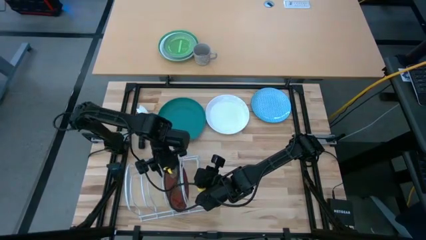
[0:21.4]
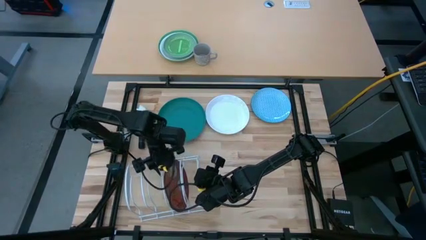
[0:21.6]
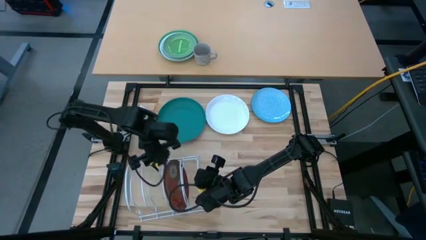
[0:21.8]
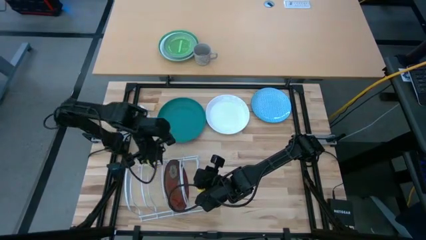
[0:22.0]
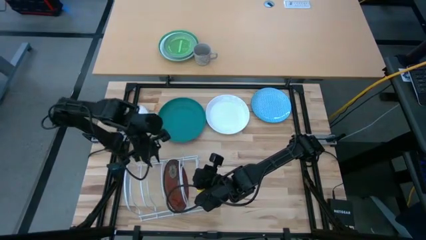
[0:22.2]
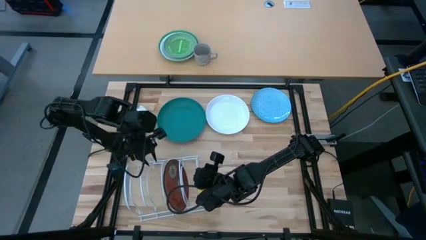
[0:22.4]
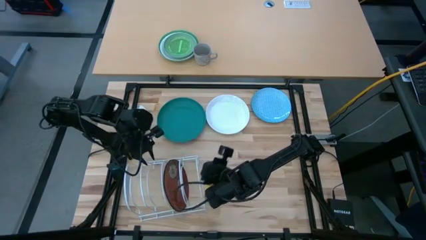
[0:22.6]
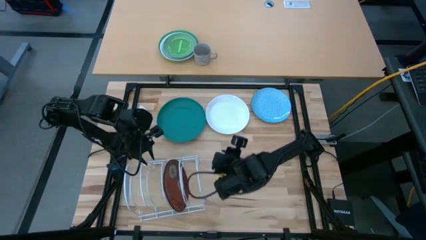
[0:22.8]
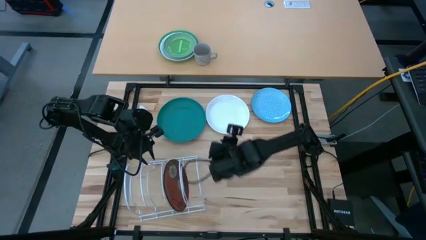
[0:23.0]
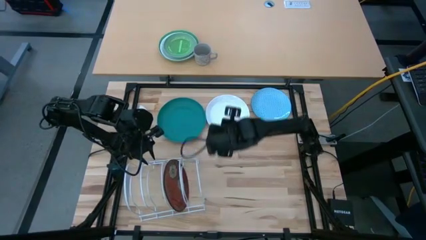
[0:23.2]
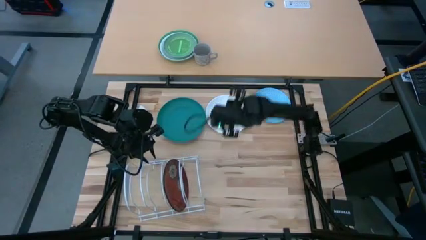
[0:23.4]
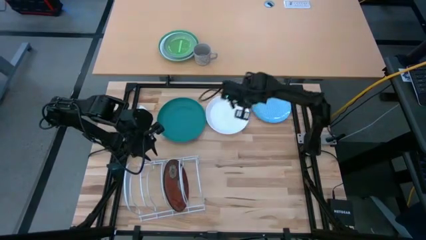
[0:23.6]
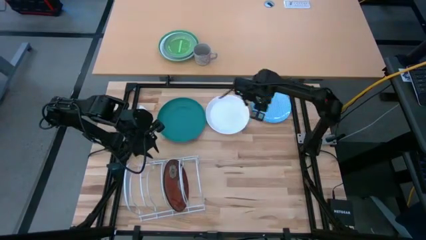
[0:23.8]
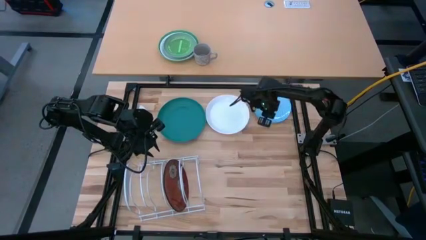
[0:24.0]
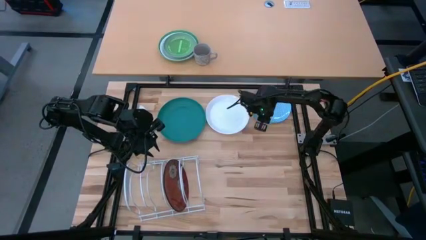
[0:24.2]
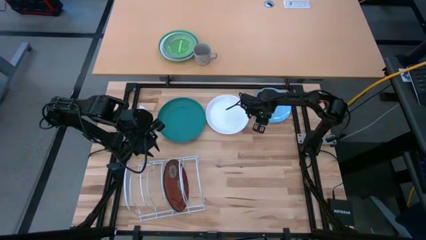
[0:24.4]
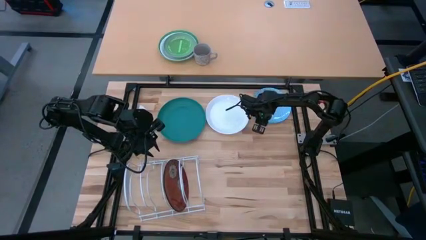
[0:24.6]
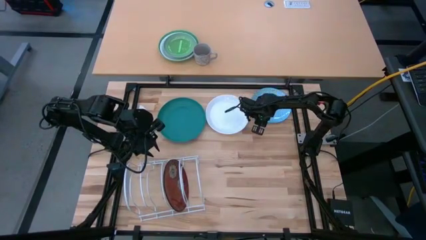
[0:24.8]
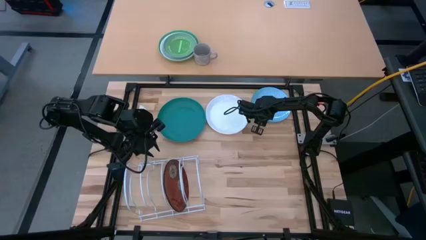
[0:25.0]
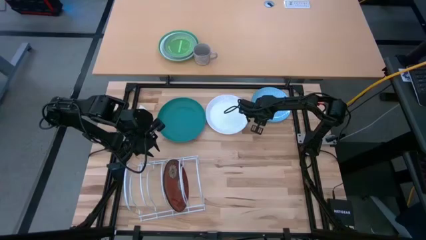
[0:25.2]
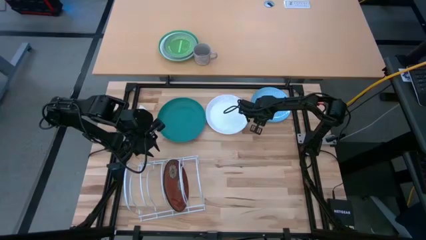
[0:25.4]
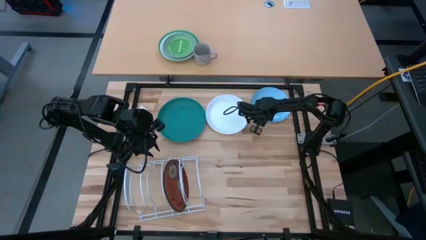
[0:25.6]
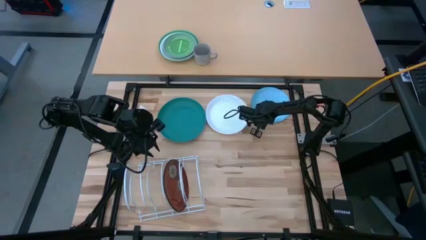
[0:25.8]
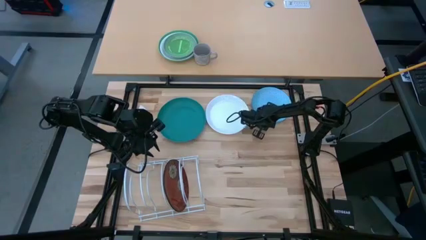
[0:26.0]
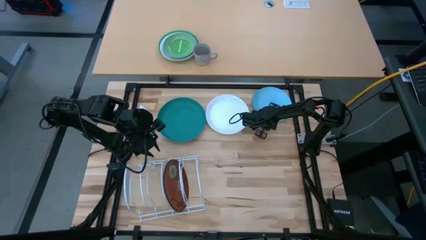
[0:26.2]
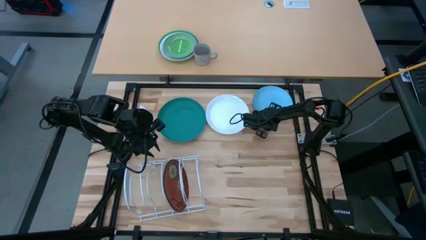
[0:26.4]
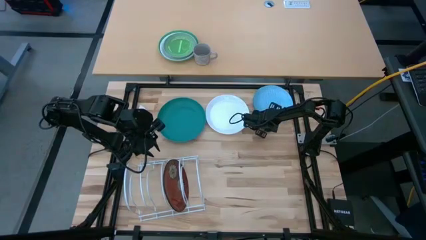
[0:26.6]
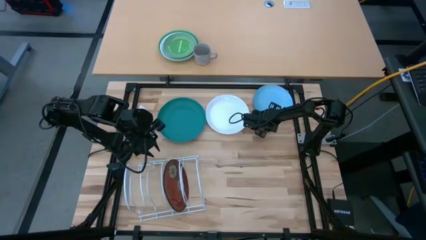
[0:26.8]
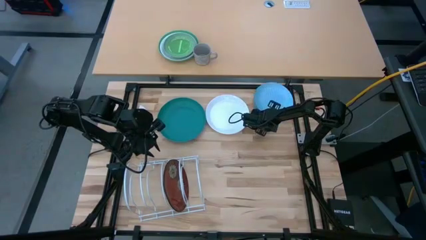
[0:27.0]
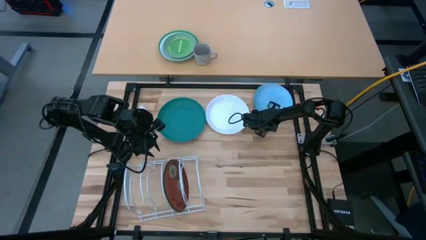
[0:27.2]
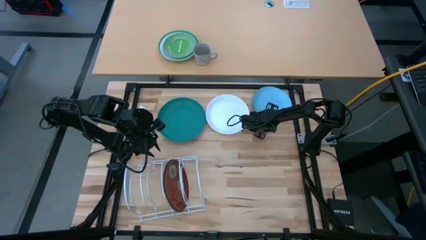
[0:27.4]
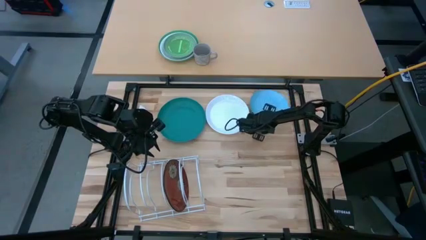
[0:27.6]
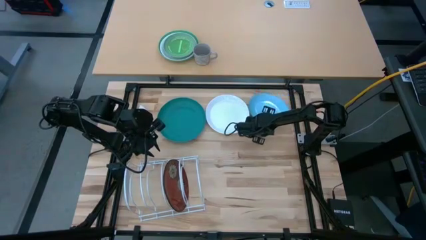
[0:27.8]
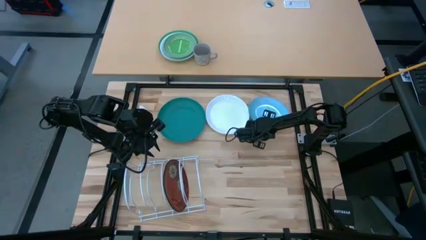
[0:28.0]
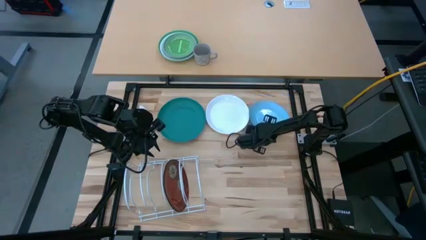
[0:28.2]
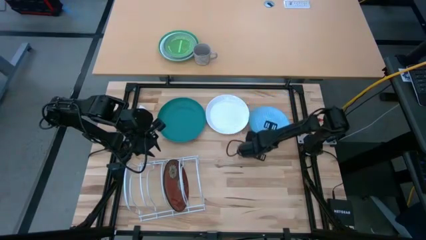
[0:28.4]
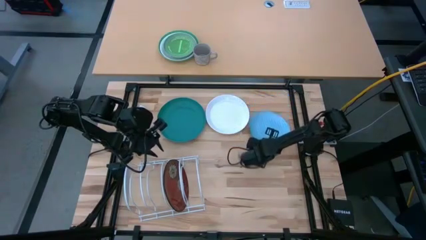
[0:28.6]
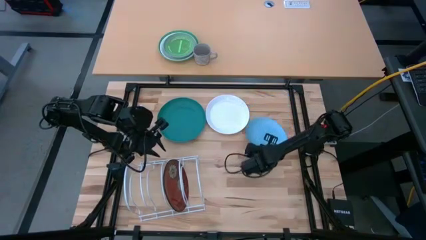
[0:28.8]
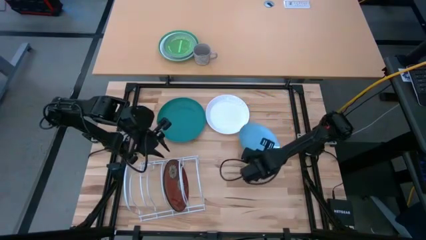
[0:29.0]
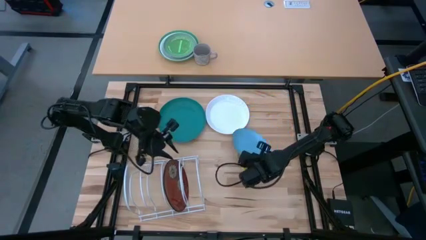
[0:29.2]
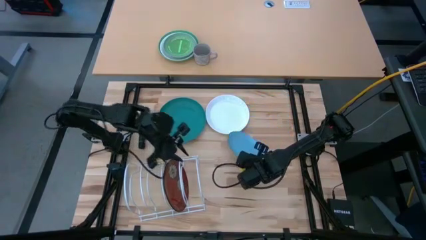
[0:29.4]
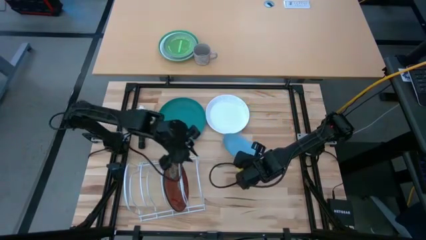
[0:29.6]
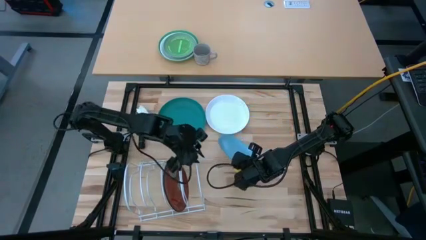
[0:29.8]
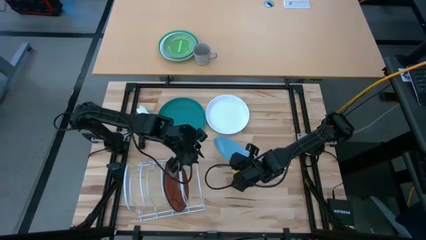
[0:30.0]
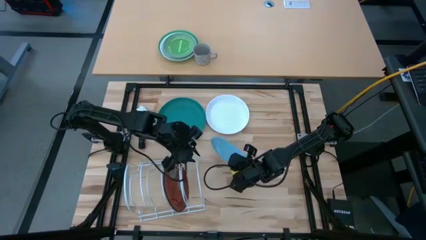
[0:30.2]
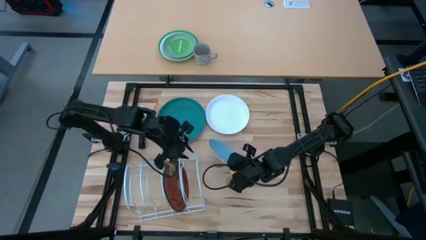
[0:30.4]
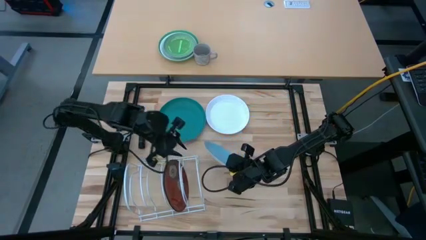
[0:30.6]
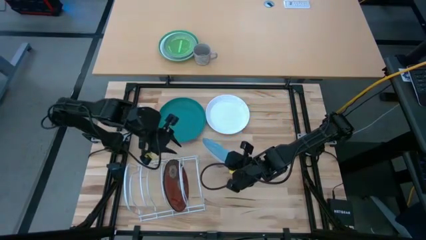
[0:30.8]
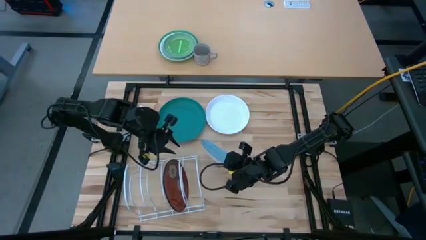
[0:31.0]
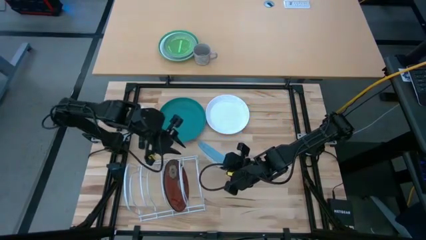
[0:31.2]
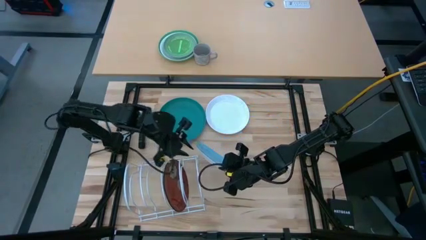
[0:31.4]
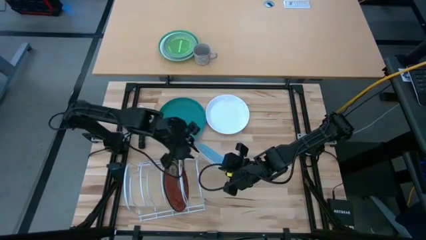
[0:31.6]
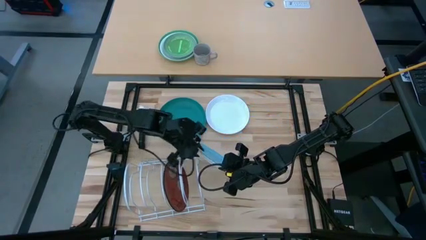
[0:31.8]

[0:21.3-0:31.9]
Task: Sort dishes
Put the light blue plate into the dish rack

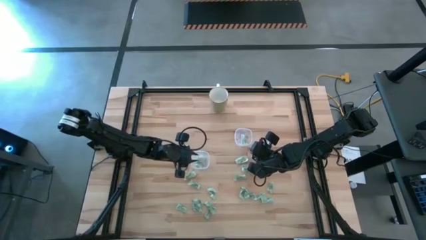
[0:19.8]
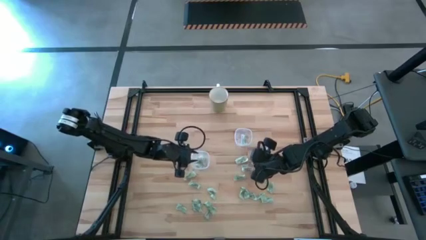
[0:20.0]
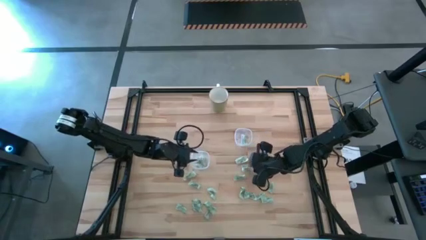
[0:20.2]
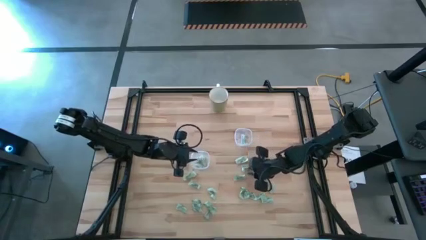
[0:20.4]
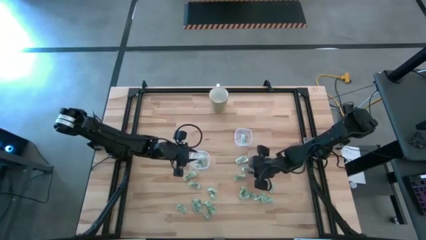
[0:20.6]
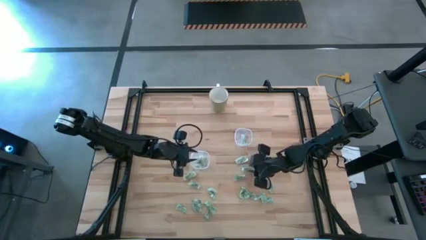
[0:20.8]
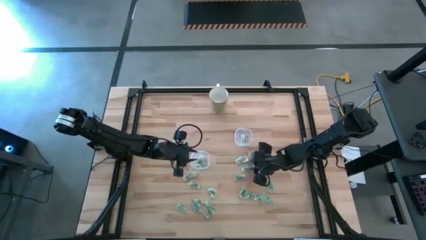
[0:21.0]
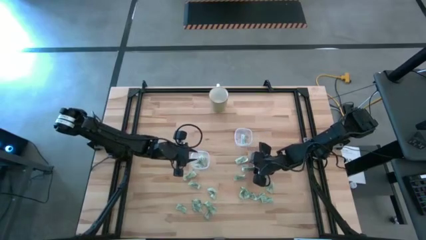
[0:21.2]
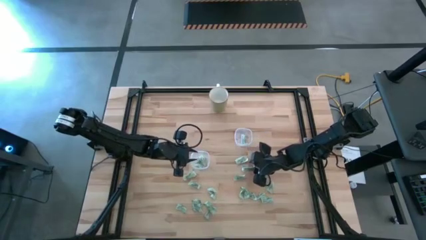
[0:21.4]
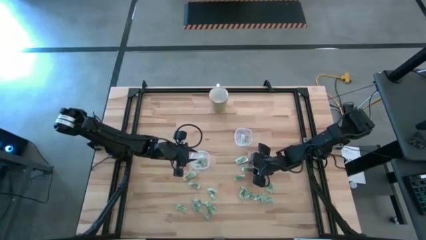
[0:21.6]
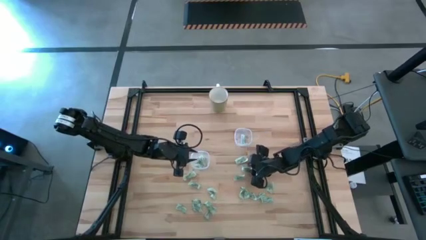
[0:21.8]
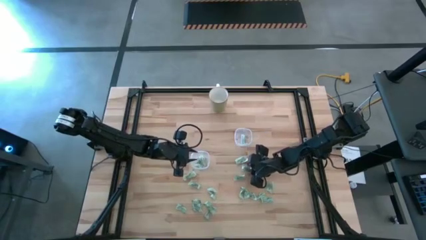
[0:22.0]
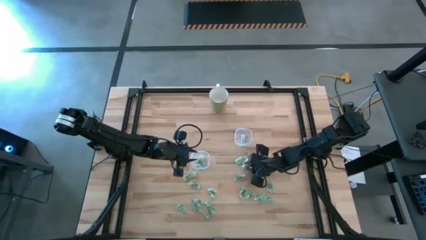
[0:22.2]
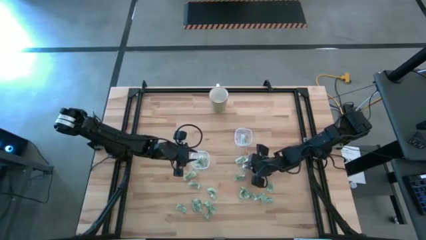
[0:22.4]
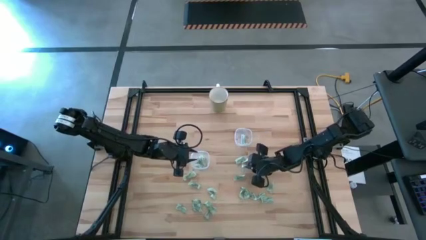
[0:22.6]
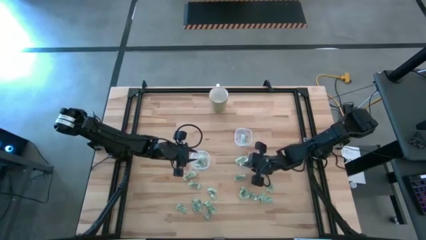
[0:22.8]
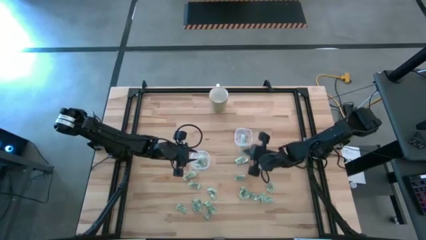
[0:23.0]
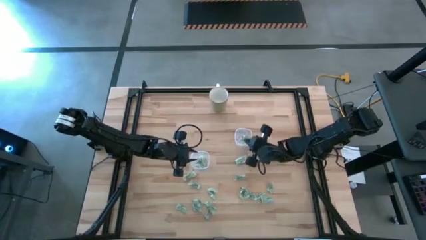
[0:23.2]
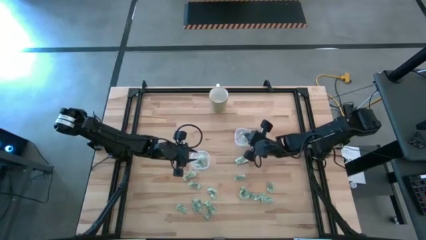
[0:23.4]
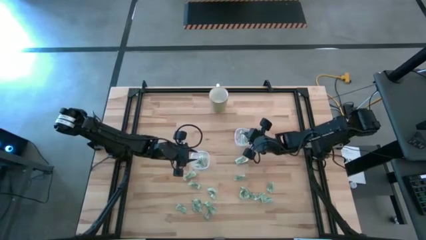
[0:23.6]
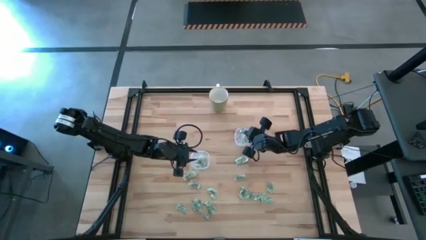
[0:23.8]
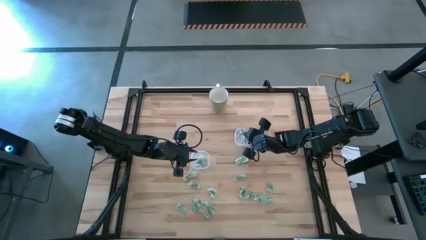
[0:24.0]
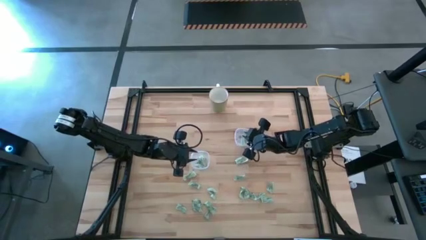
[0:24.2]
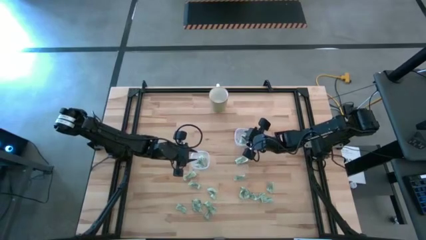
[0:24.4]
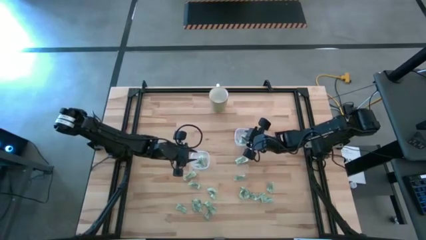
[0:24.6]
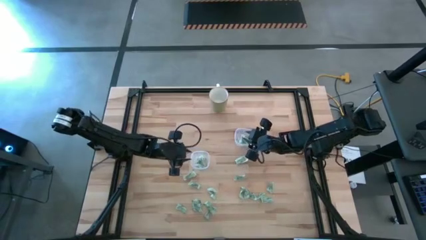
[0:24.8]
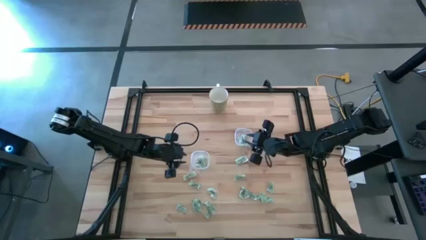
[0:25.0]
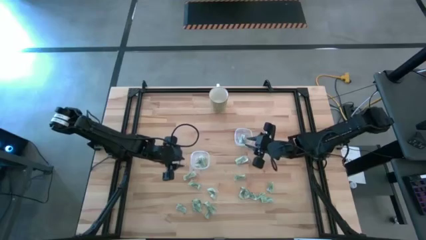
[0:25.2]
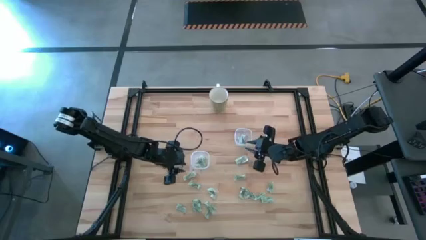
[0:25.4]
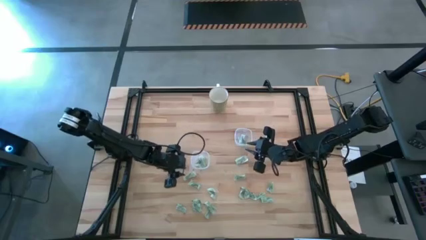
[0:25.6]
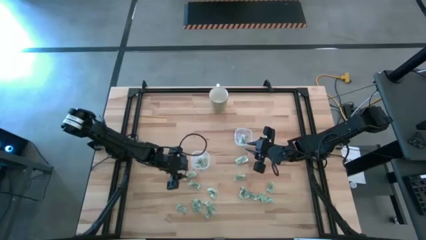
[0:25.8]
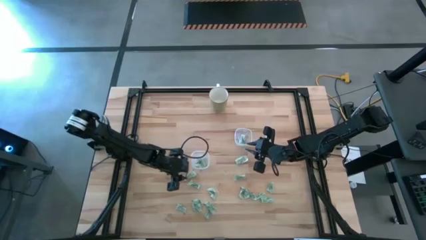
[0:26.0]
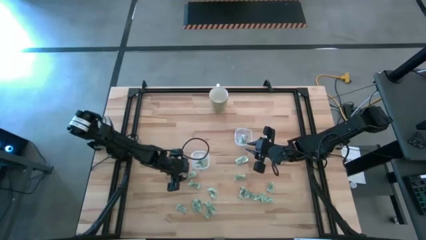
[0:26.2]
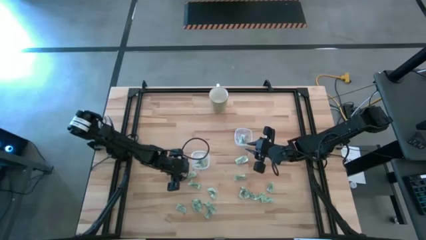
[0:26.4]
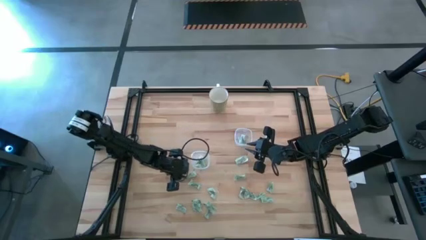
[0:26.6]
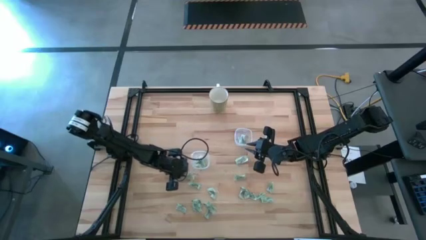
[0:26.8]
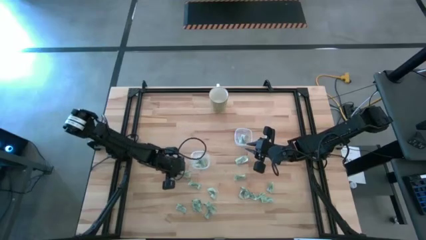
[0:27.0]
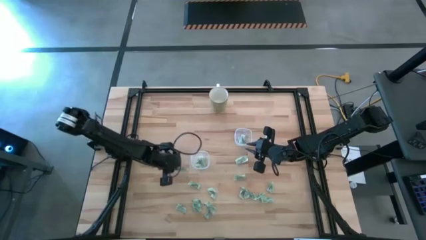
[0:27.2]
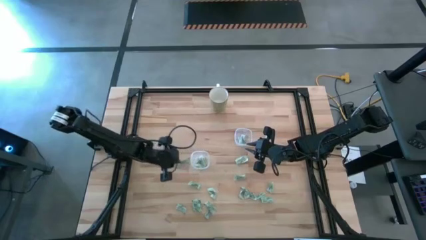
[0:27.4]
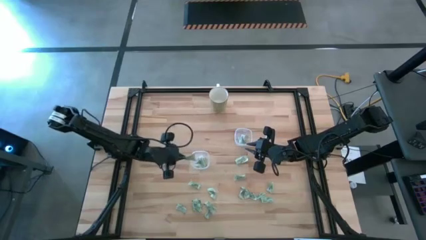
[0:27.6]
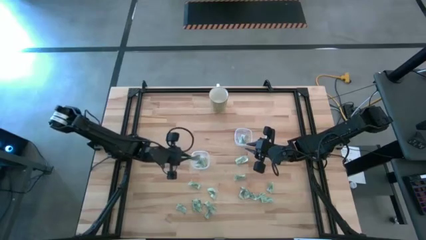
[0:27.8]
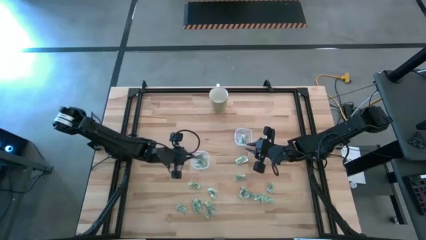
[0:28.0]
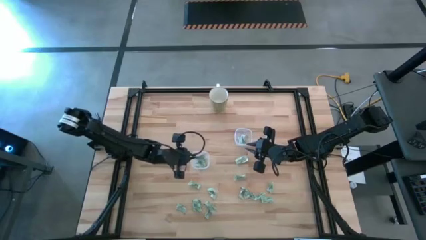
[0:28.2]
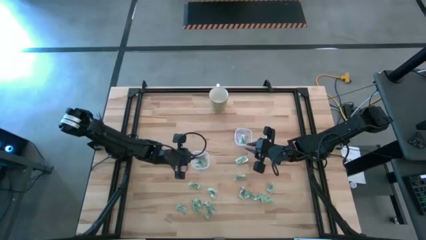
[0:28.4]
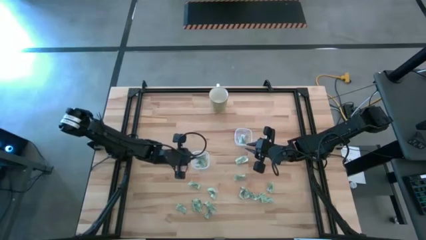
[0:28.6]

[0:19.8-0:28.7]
Task: Pick and place Stevia / Truvia into bins
Put the green stevia packet into the right transparent container
